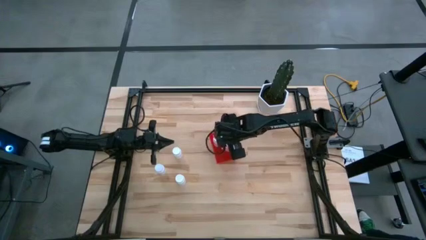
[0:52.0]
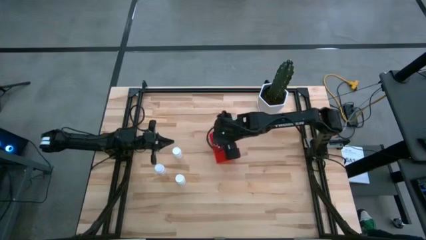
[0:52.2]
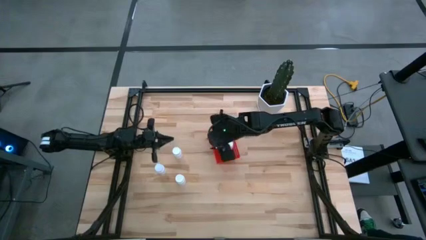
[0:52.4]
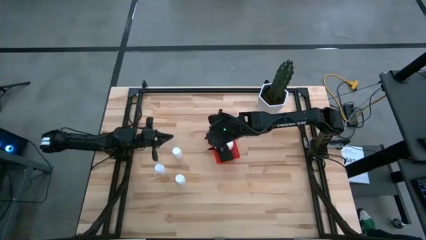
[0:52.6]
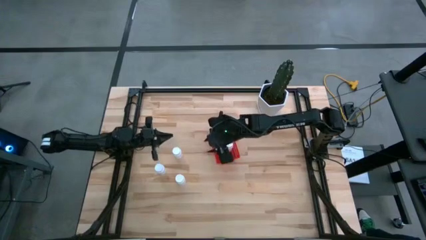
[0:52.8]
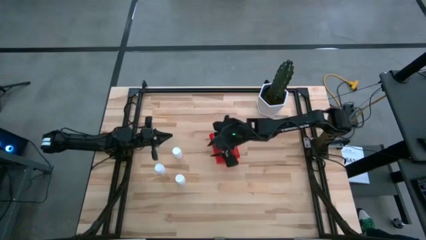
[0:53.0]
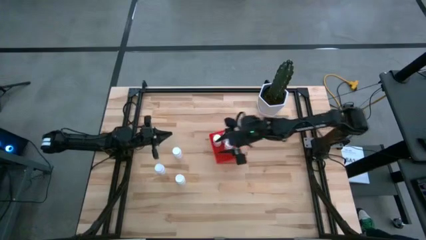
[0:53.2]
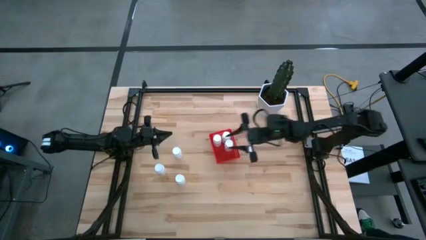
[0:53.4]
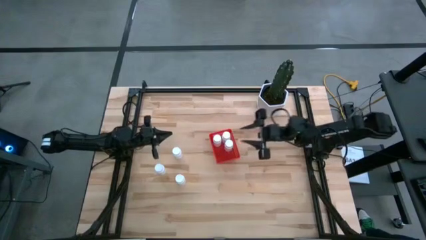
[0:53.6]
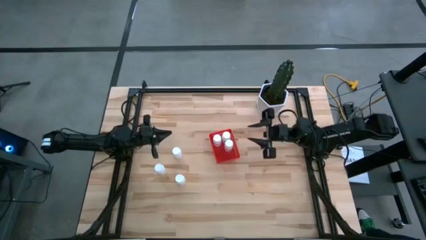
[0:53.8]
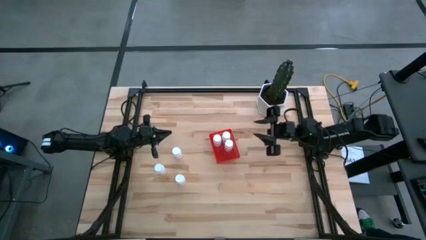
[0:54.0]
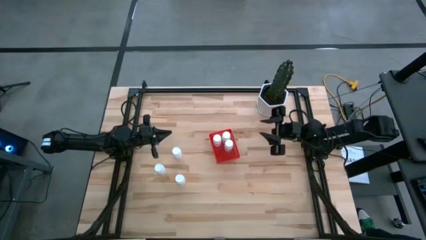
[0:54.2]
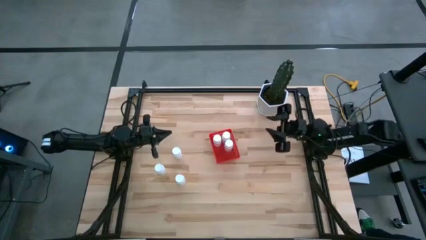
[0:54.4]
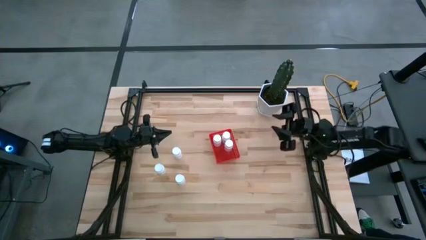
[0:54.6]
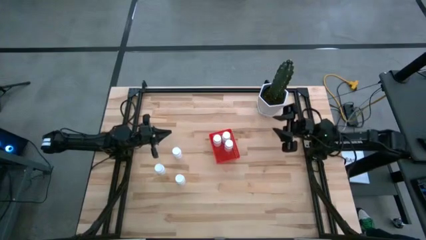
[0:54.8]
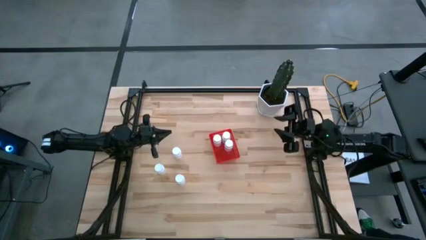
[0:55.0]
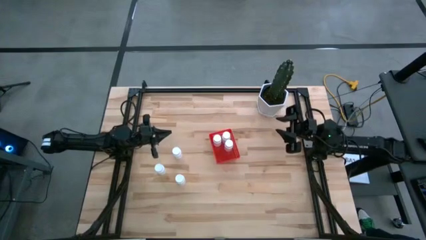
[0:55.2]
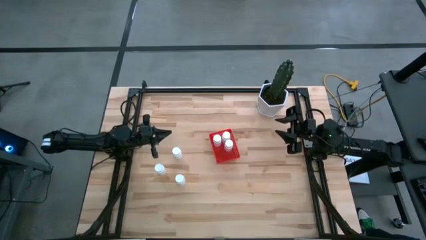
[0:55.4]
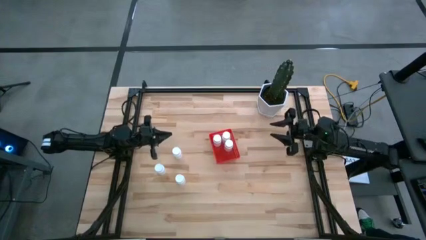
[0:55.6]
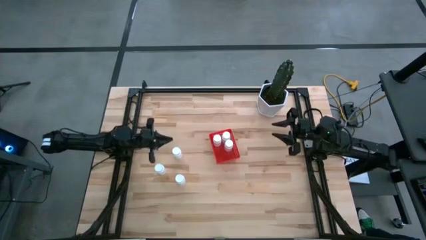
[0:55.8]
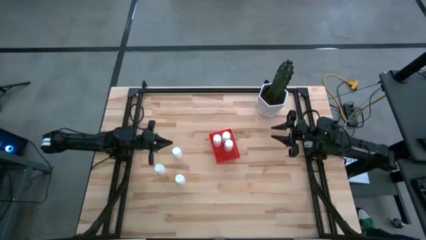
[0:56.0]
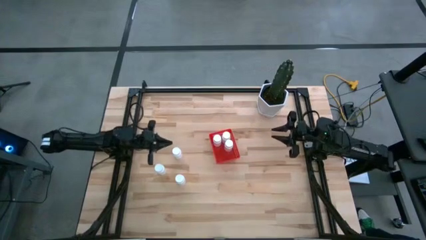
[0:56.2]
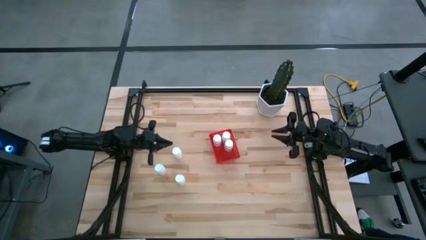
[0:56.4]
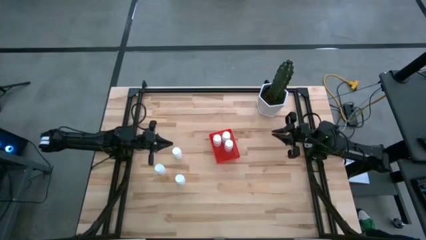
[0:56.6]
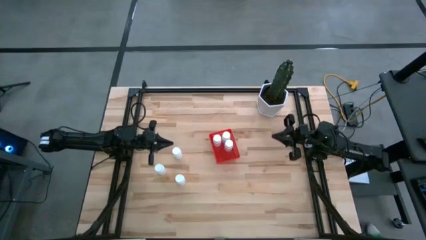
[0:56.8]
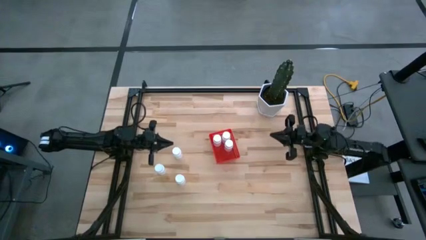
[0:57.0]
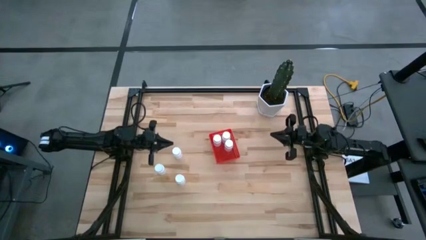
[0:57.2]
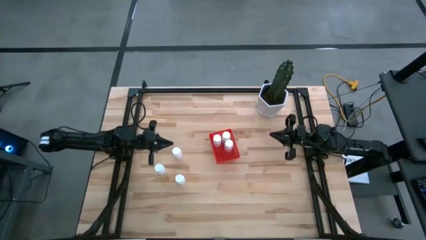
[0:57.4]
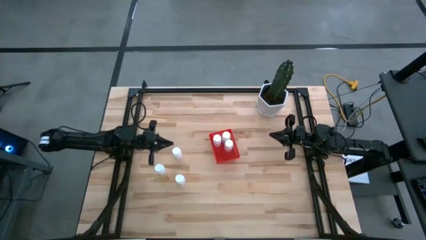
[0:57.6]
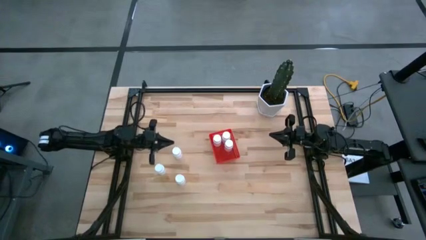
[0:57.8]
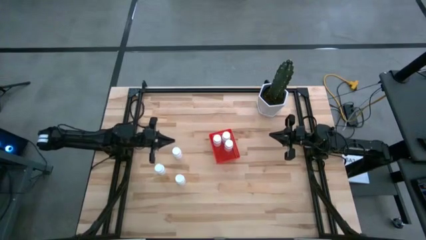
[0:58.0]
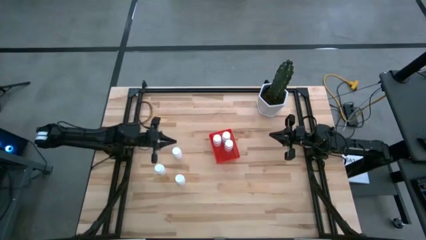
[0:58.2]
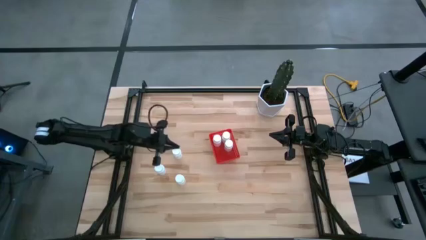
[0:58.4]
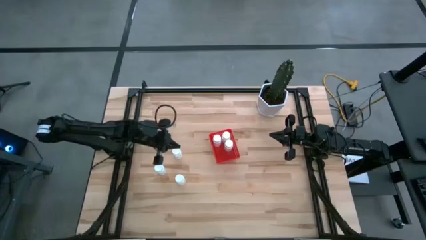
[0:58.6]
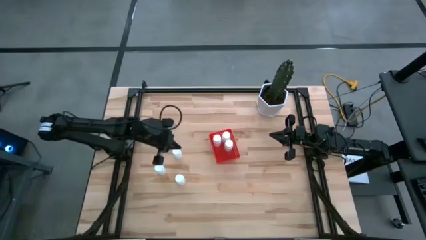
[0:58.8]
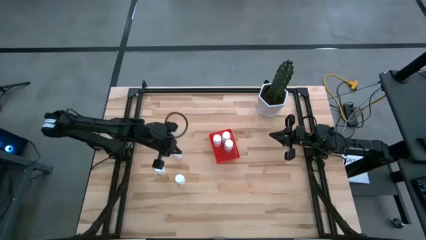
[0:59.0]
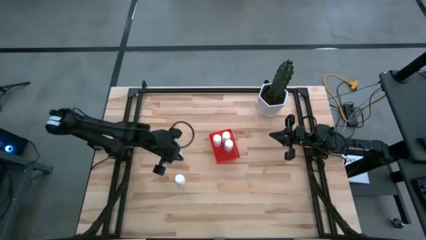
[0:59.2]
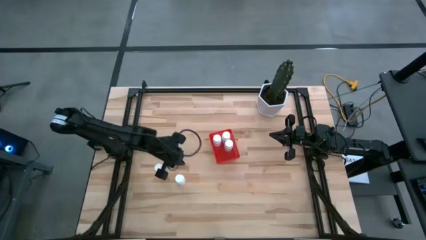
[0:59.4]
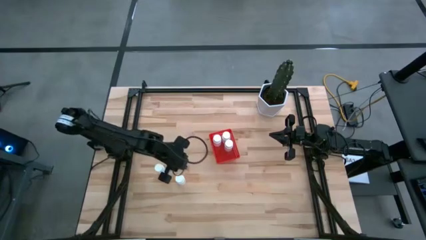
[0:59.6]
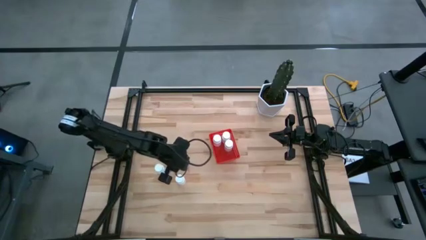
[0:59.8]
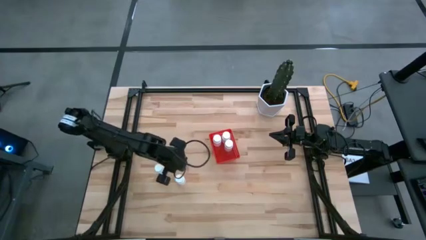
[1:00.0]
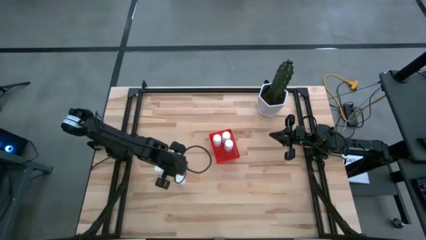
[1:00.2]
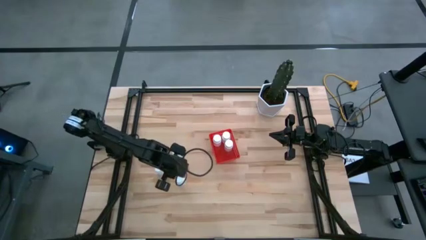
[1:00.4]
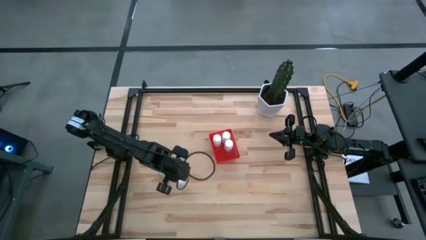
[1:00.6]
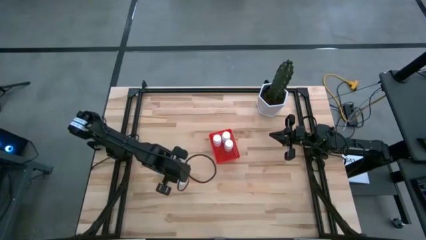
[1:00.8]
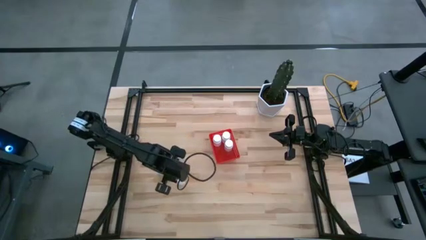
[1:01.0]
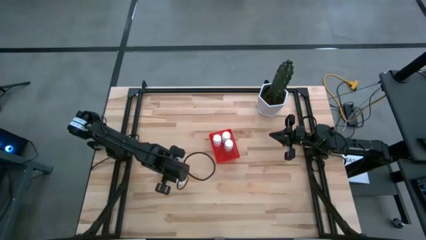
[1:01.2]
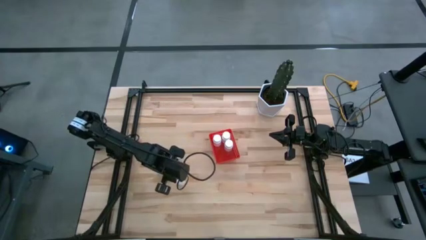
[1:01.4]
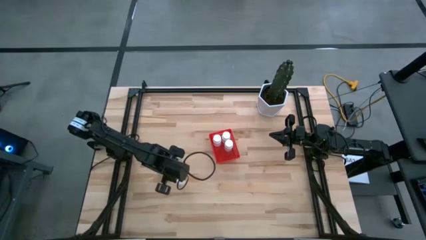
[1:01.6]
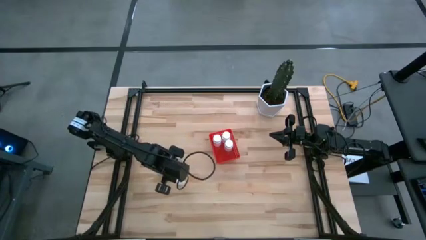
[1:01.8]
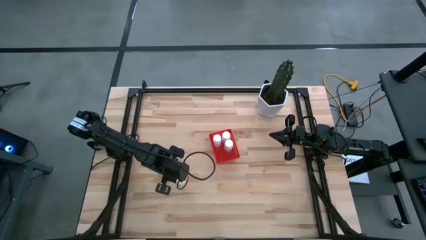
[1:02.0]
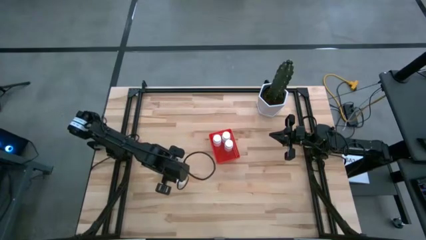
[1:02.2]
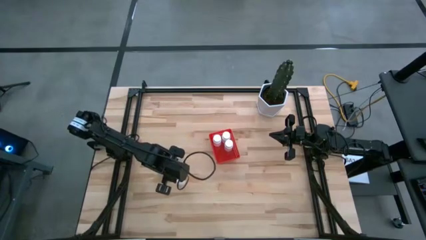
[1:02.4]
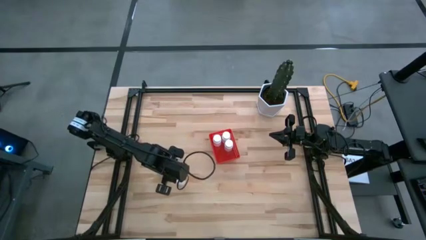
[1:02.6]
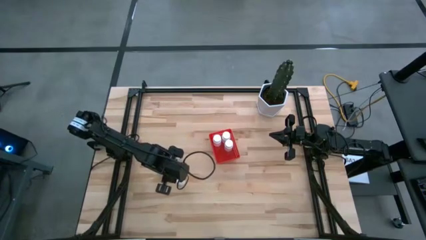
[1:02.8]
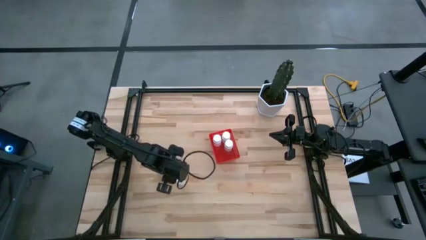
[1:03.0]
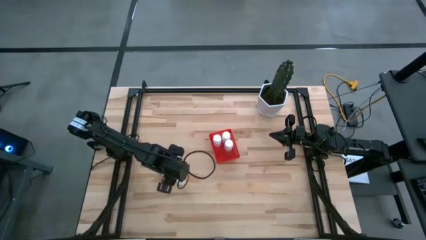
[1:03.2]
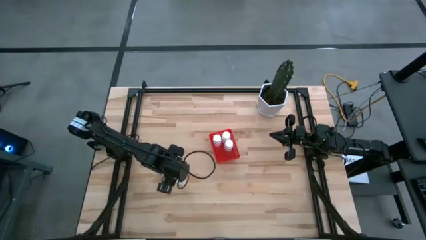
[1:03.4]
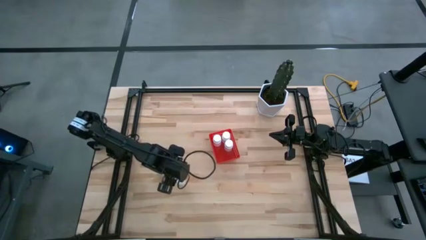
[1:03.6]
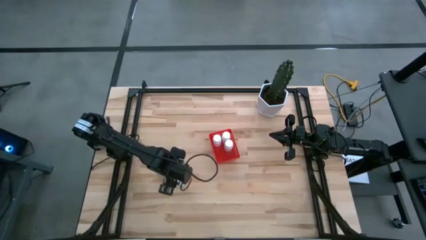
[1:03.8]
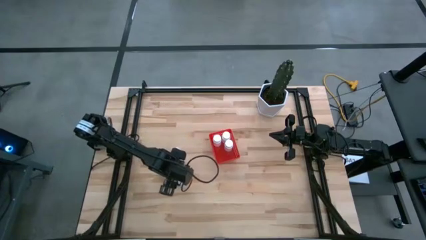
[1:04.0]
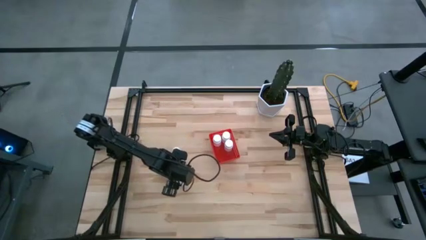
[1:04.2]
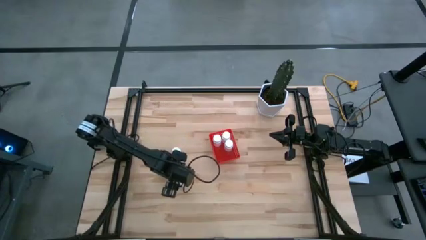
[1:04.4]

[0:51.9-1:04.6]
Task: Pick and place pill bottles into a basket
Put the bottom right white pill bottle into the red bin
